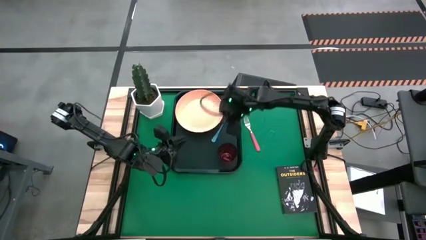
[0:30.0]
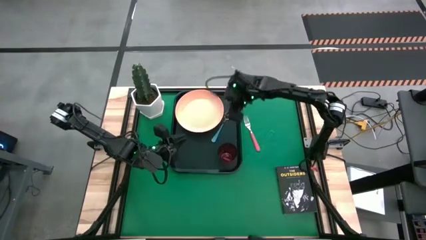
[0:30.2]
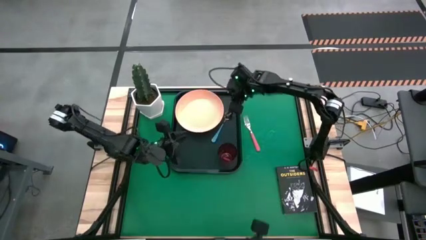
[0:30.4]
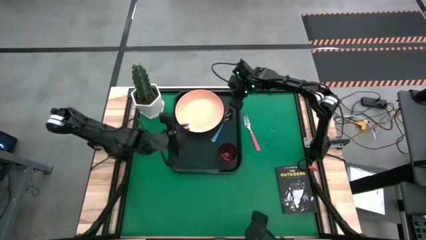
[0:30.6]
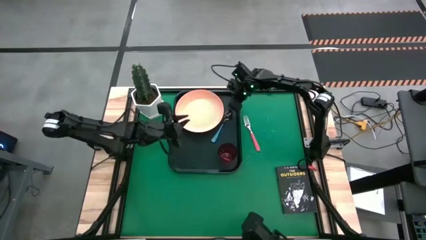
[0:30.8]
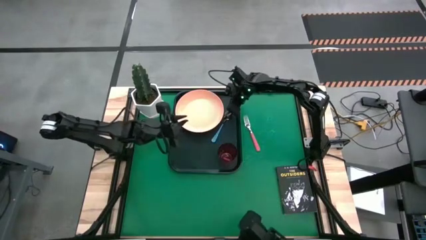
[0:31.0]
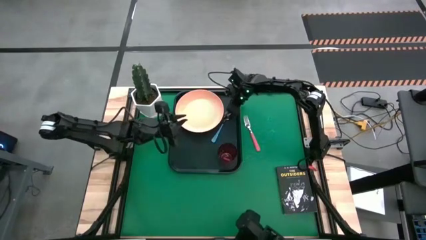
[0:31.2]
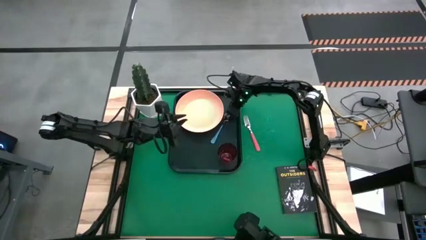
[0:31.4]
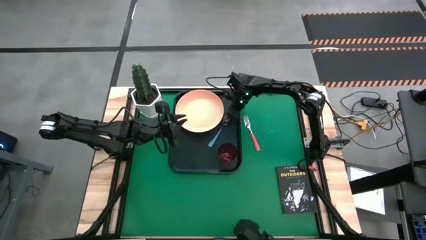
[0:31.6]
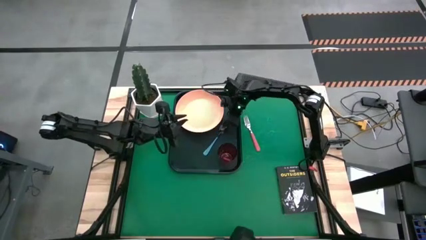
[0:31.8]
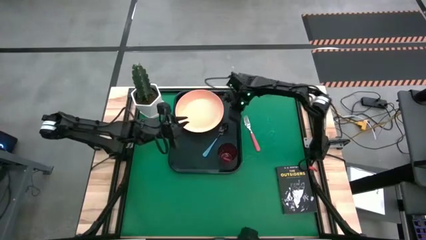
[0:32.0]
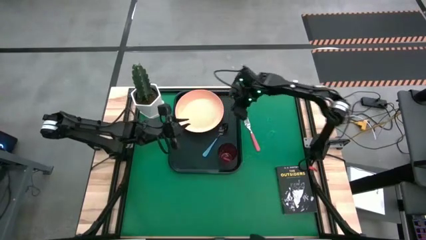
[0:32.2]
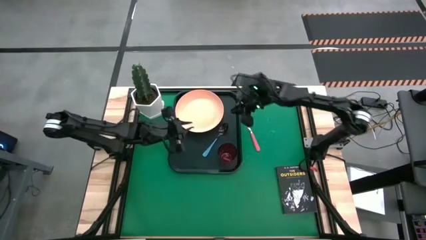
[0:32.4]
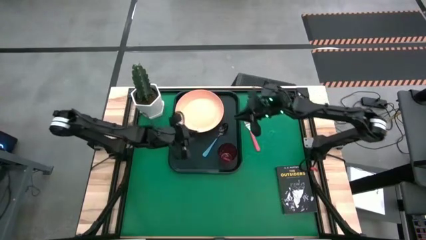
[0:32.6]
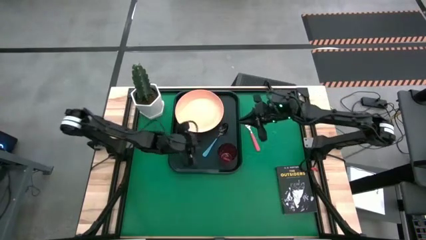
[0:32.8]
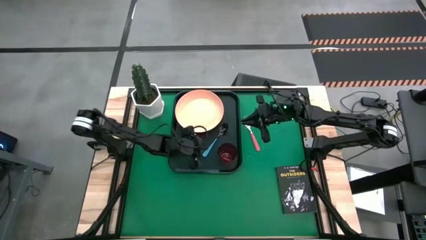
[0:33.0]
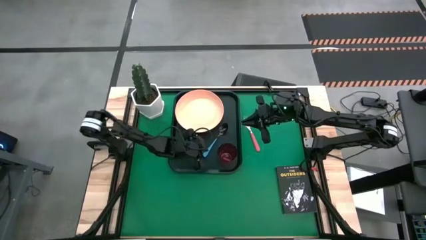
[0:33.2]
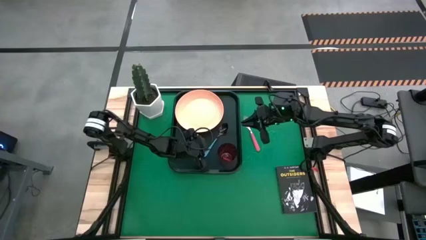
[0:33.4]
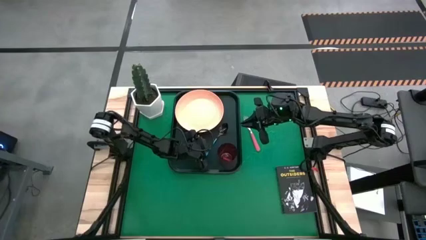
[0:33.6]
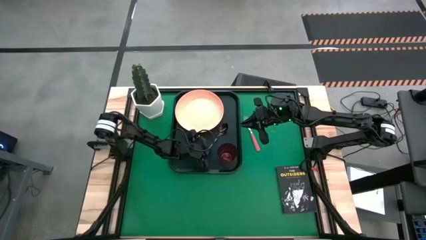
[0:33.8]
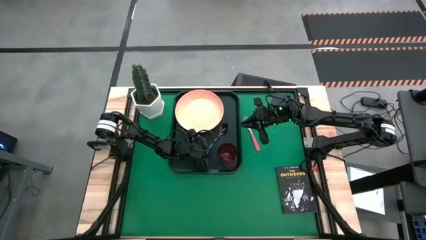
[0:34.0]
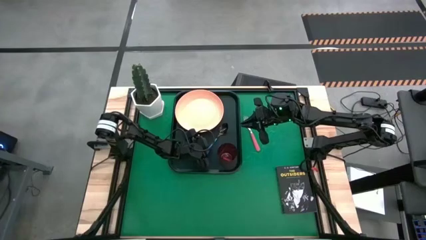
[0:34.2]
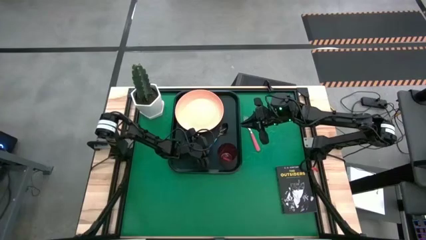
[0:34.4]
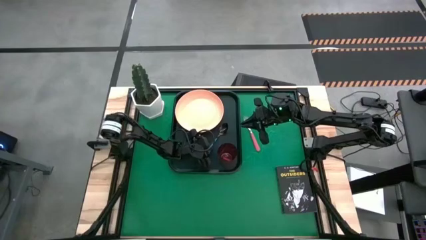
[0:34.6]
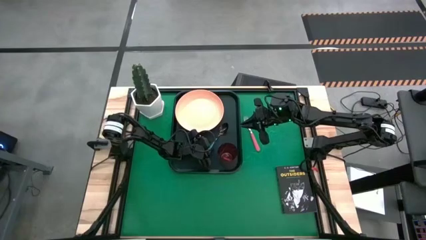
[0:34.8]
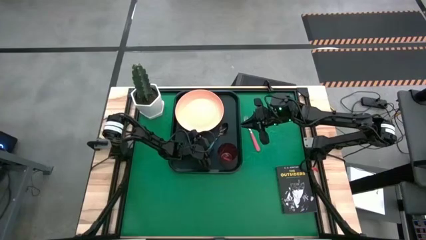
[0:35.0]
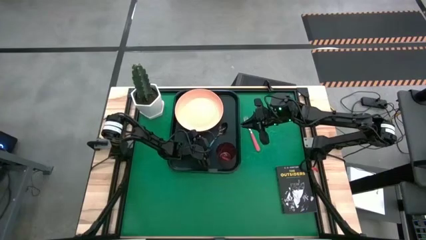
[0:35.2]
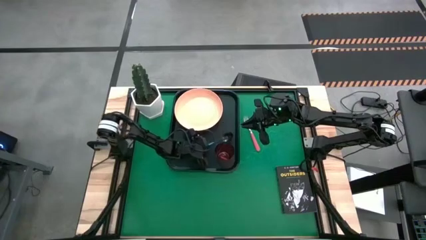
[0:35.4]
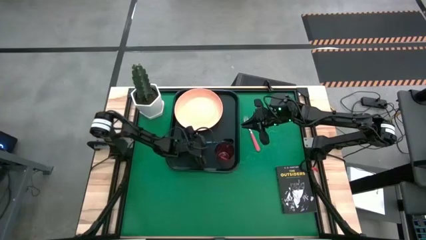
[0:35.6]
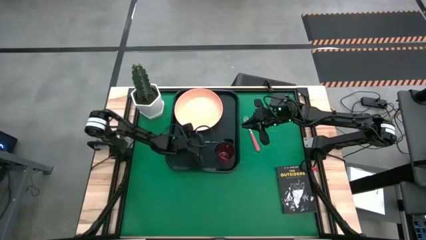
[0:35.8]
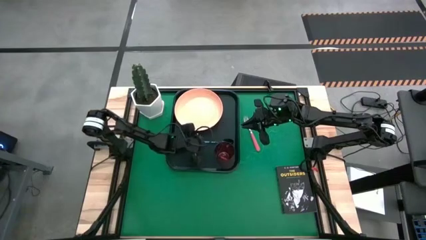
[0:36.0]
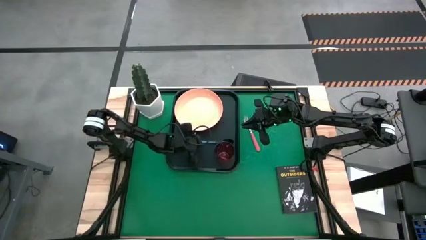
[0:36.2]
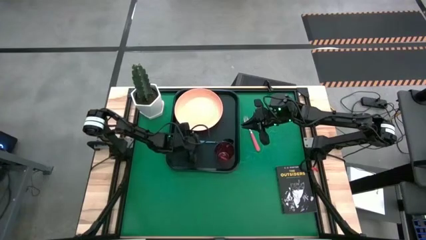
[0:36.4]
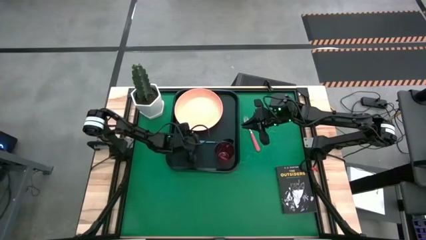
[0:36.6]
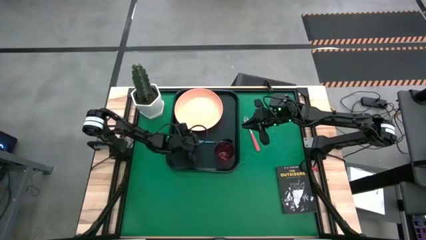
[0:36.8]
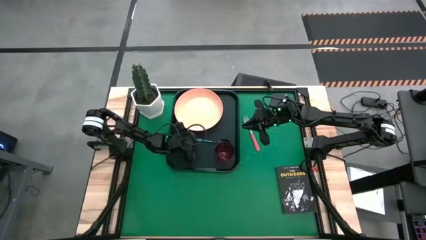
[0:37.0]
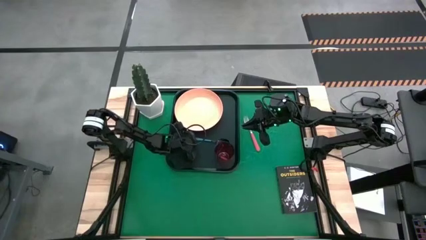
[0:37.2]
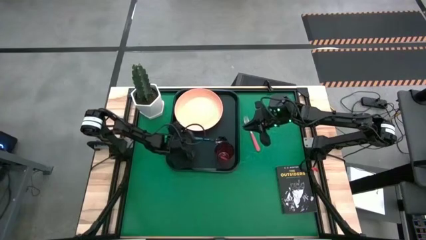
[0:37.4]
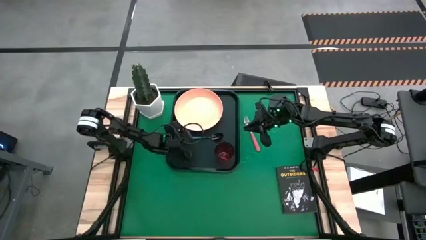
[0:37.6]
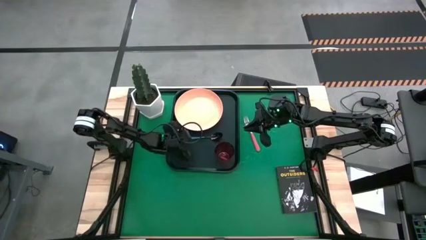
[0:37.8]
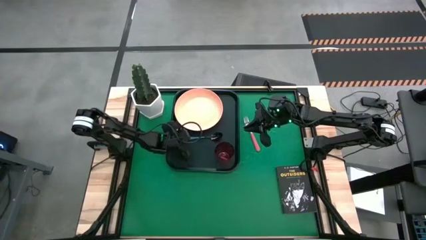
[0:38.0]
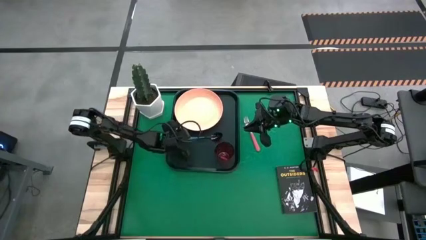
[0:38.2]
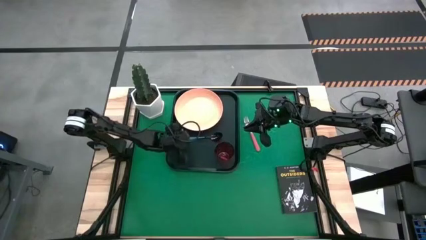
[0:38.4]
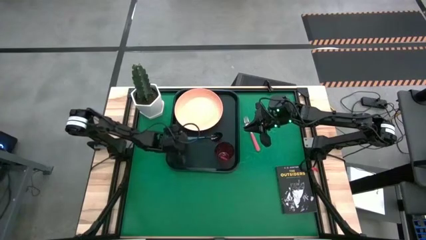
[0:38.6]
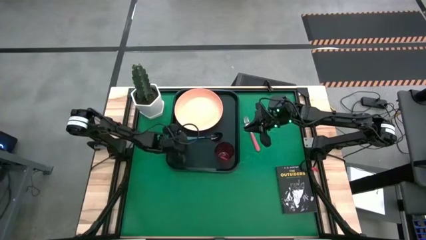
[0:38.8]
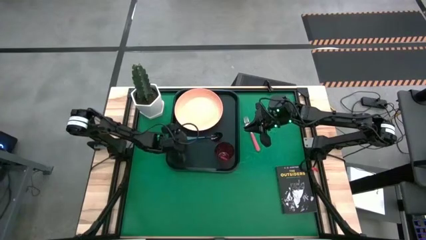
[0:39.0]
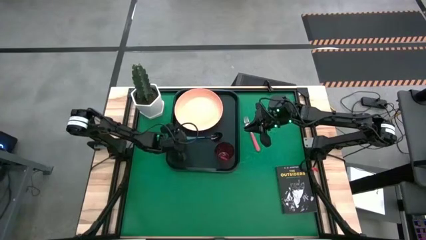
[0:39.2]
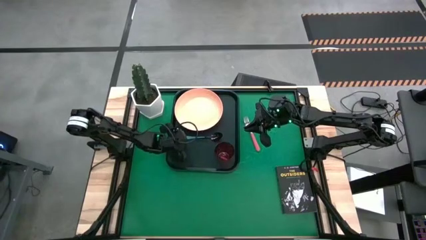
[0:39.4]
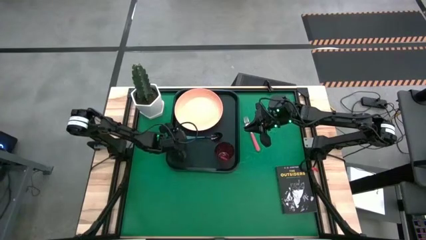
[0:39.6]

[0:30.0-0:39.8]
Task: Pick and place plate/cup/fork/spoon on tray
Put the blue spoon to the bottom of the light orange plate on the black serving tray

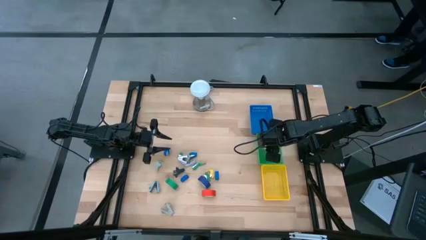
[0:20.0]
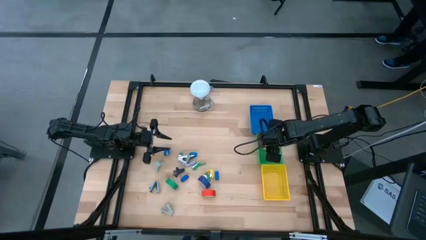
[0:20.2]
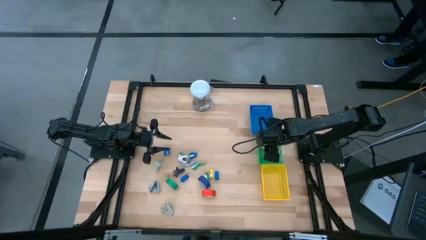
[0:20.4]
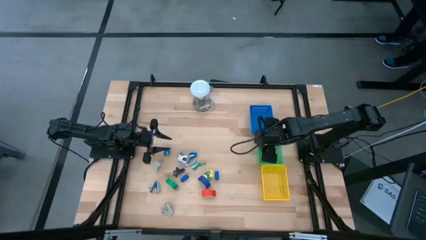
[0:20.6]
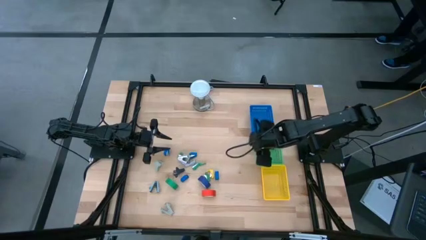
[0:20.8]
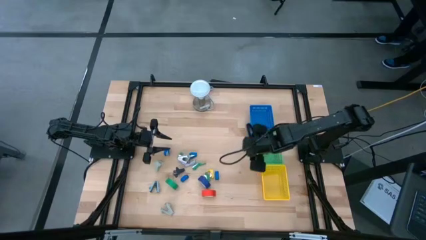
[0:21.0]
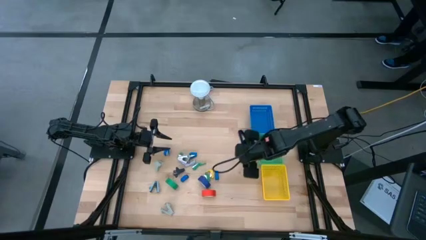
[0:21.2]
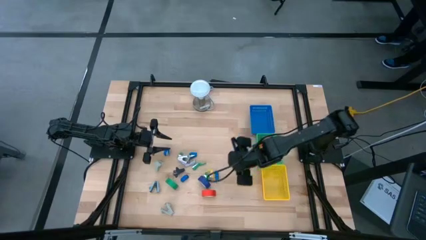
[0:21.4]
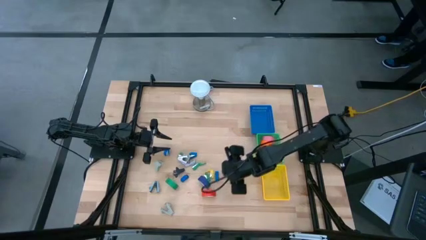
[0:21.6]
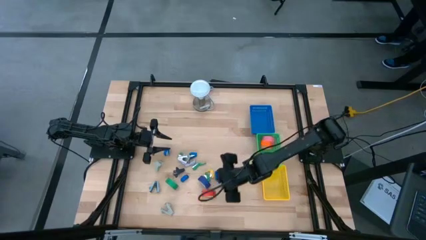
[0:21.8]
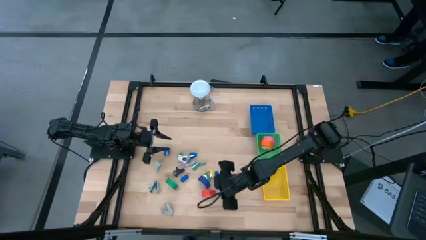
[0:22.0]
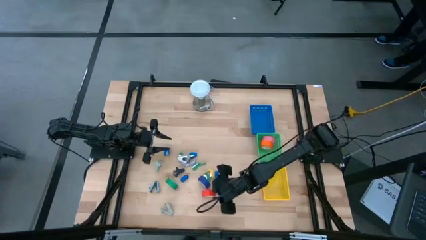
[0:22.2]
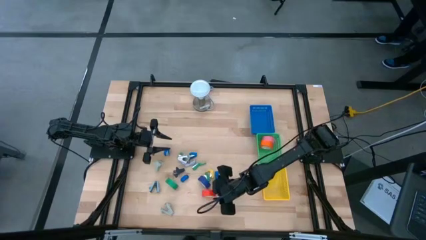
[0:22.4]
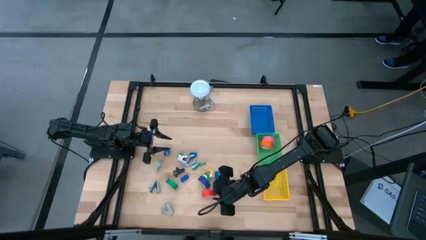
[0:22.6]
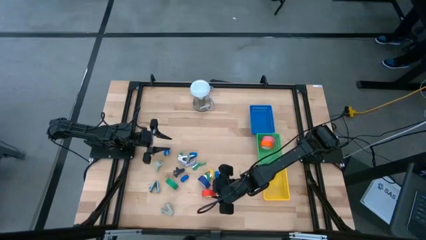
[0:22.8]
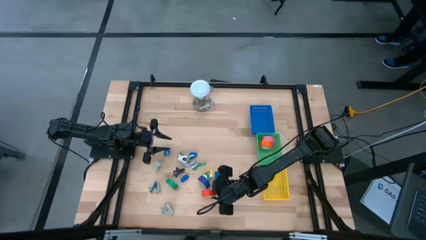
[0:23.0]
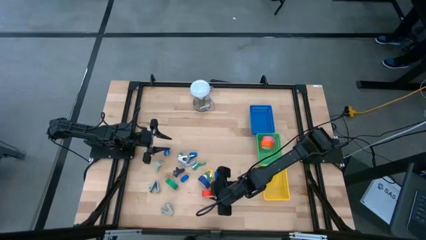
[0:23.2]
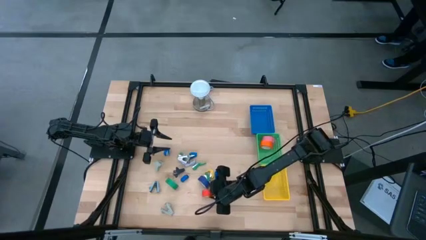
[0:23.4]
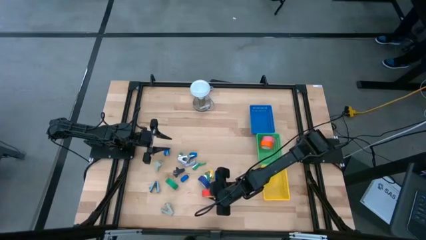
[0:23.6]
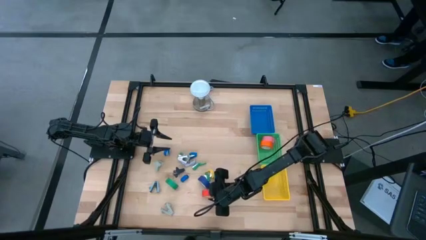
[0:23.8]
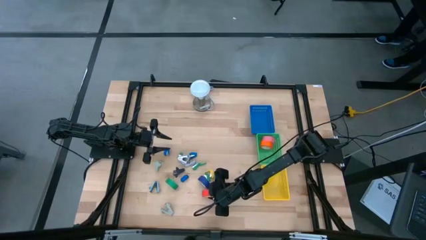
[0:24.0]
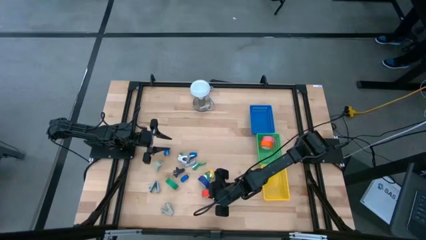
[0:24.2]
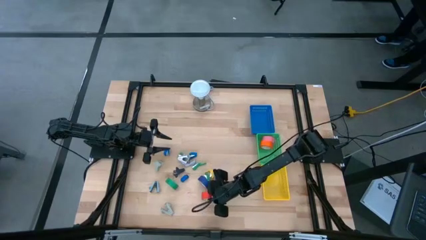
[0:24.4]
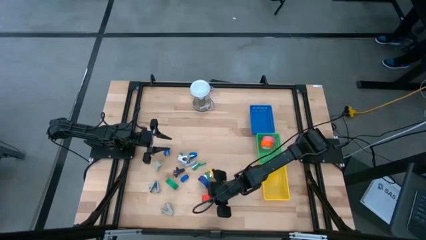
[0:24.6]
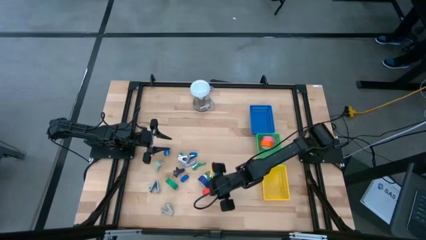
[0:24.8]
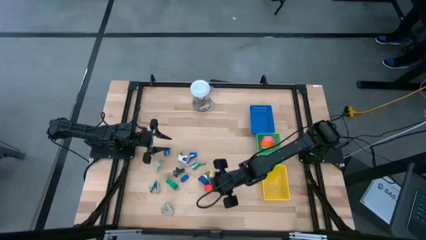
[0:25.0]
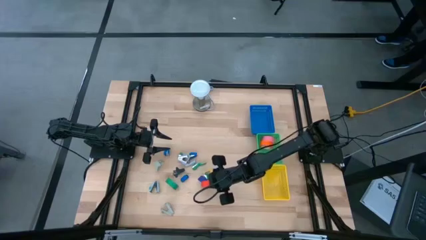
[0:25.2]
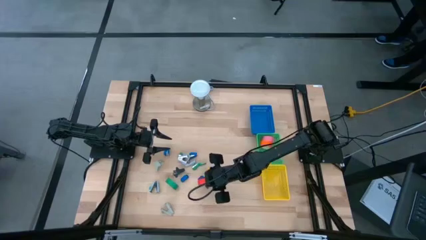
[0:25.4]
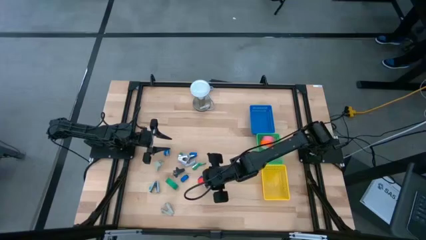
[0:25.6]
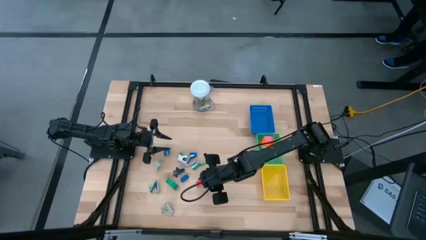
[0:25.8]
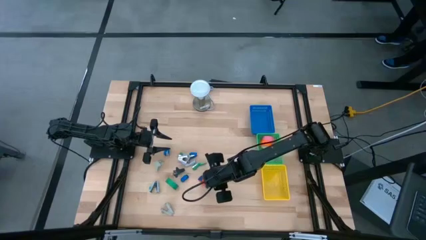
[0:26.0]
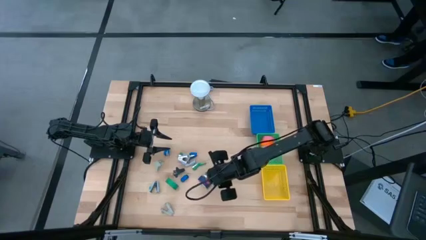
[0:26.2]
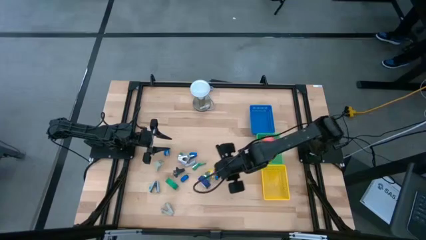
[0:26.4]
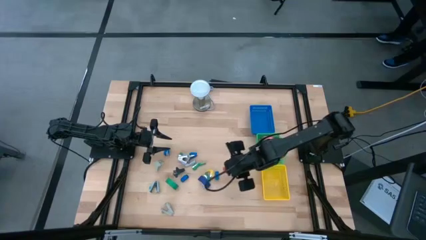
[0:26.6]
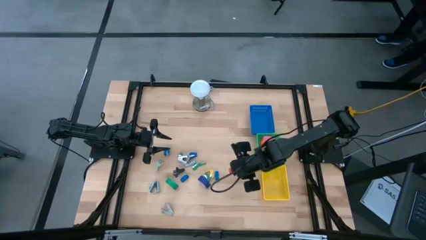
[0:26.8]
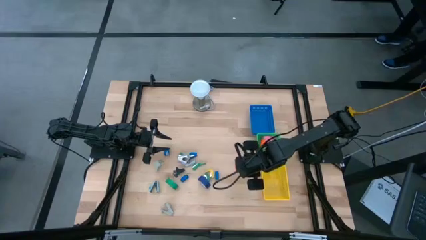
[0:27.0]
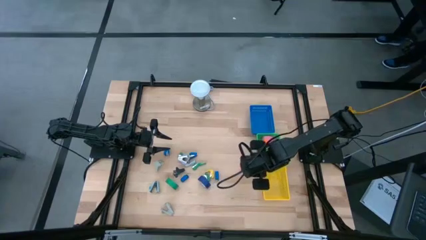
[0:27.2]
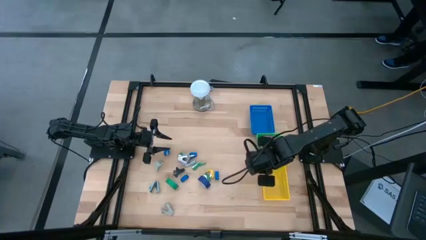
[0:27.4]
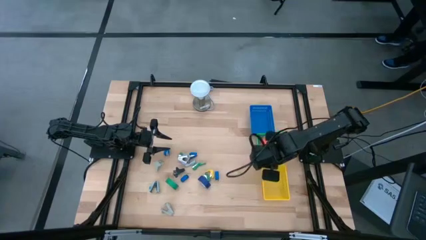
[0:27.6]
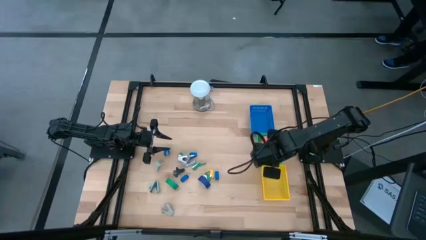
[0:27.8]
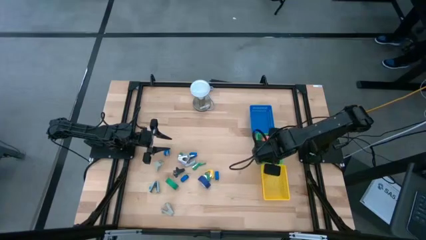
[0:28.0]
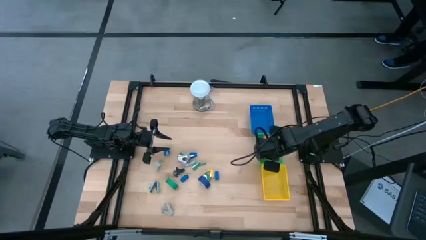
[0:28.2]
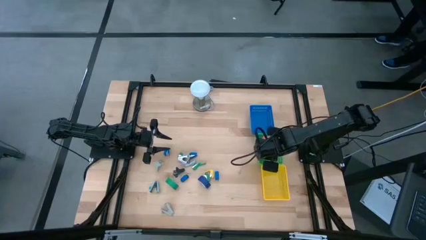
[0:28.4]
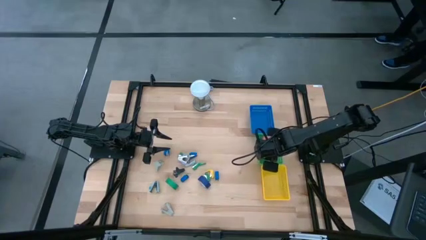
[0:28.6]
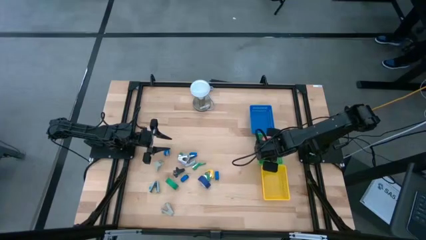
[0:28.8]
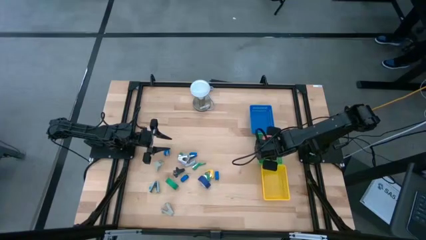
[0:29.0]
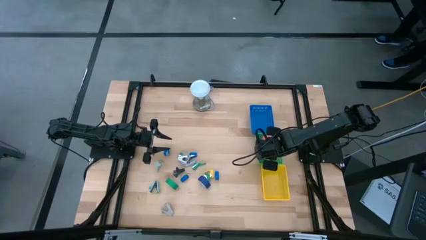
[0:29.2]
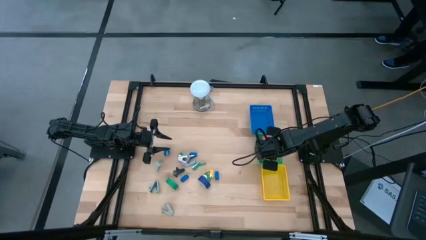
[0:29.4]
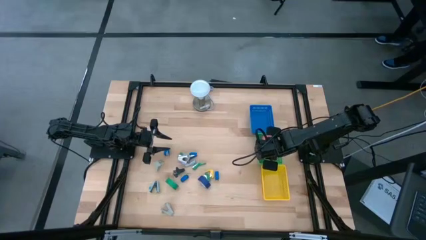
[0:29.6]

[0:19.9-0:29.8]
Task: Pick and place Stapler, Stapler remover, tape
Put the red tape into the green bin
